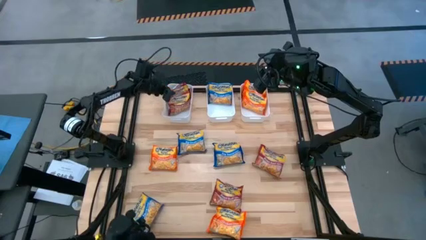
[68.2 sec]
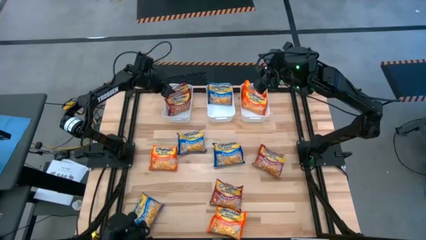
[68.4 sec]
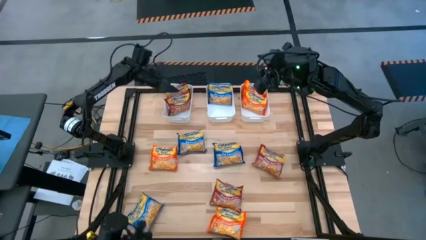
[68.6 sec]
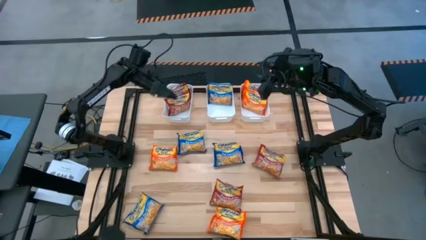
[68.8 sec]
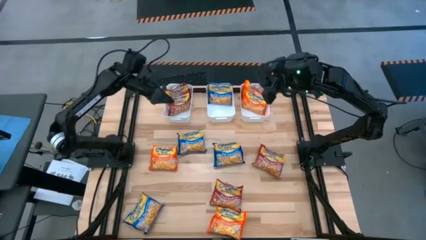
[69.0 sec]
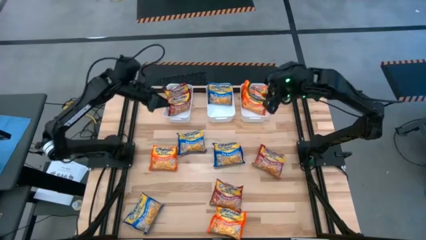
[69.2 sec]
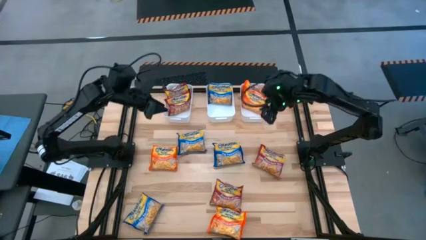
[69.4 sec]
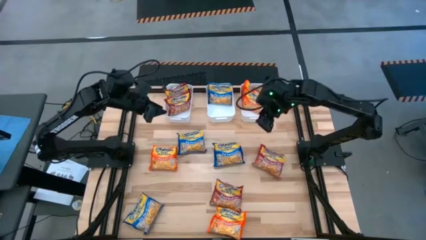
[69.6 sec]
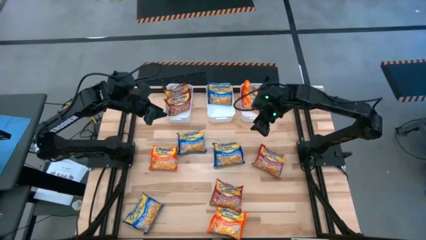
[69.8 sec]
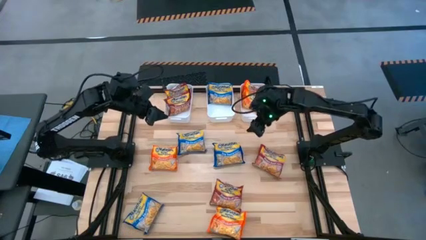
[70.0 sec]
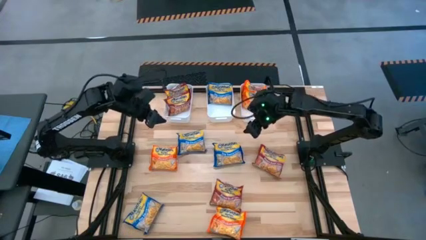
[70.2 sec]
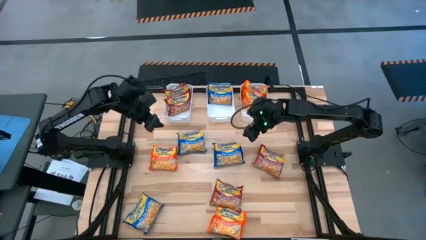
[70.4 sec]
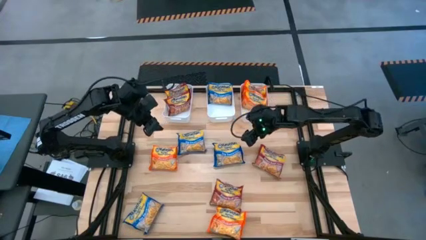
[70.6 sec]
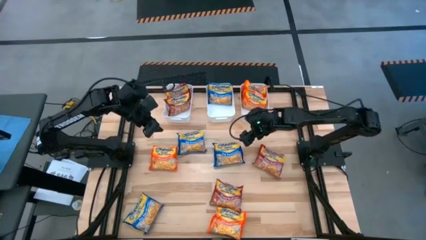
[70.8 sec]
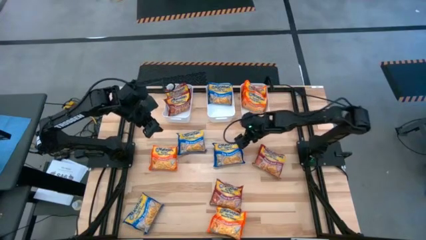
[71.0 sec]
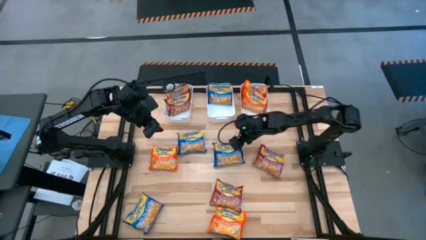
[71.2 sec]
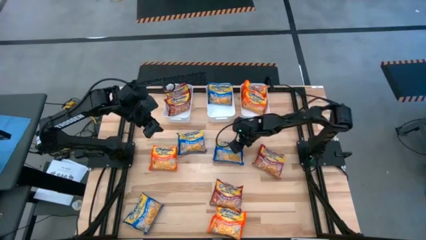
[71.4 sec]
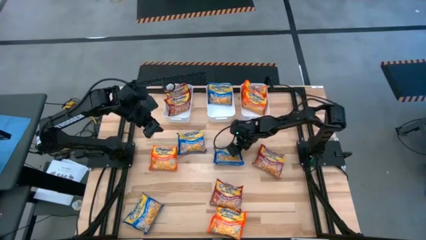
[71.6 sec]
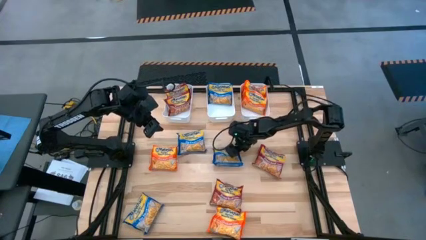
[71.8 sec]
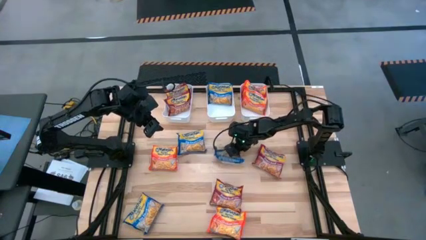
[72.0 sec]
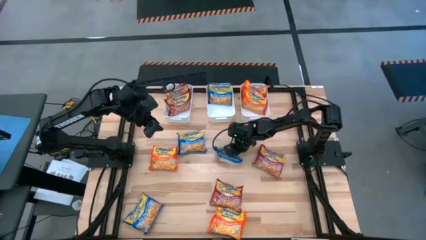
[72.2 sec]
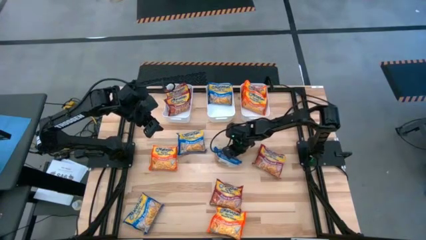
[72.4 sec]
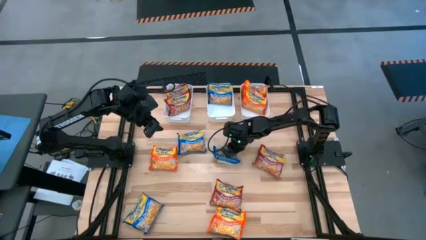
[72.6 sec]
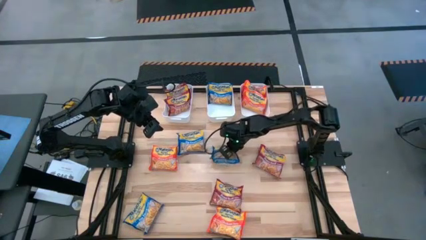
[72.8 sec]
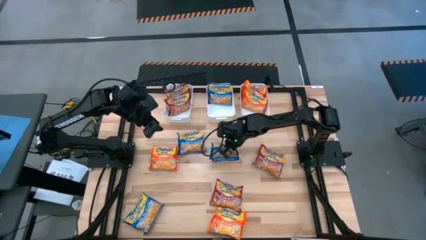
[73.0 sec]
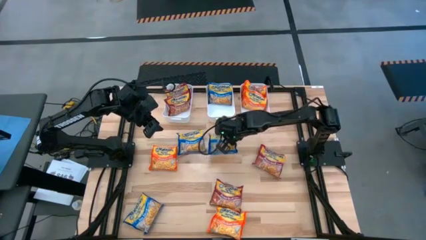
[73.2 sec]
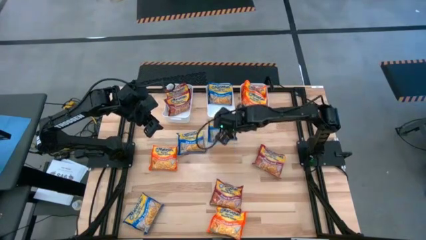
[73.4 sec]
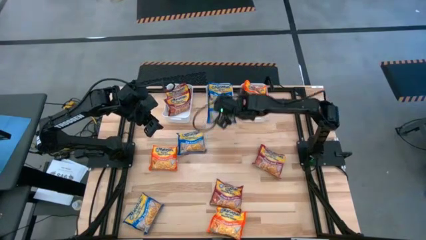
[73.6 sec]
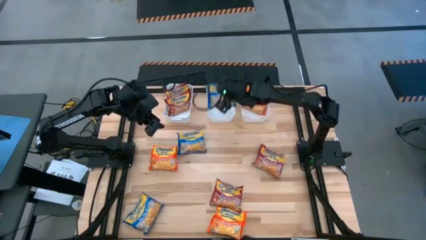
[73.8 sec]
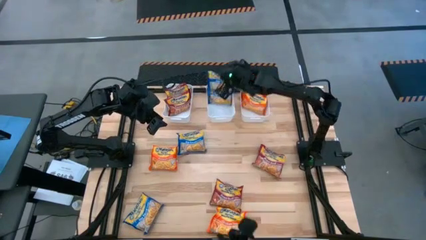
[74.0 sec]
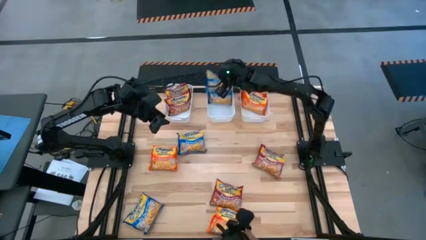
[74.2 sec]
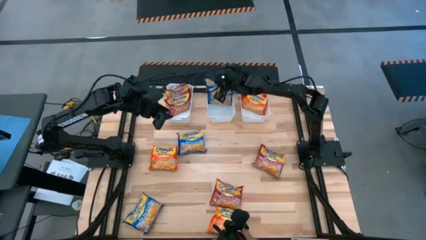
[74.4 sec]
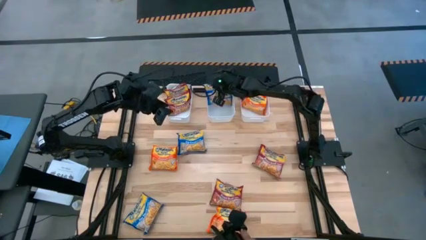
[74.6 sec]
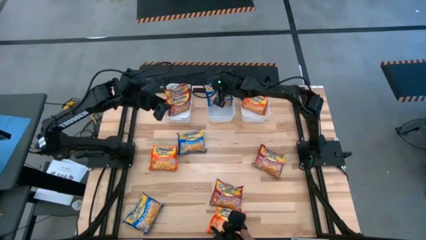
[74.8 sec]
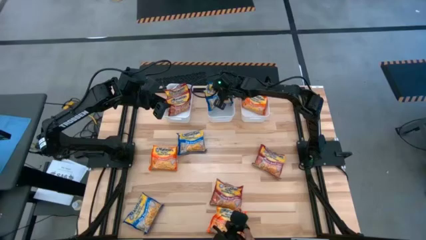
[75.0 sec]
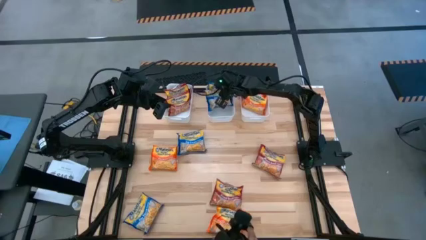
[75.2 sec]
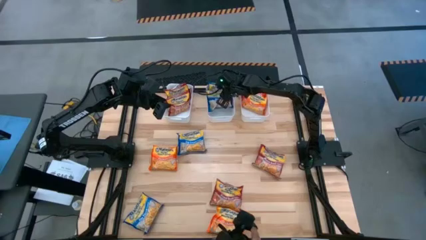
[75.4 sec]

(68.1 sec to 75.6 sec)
Task: Sort Maruchan noodles
Put the top blue noodle pack into the top middle white bin

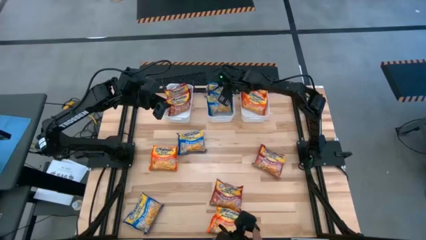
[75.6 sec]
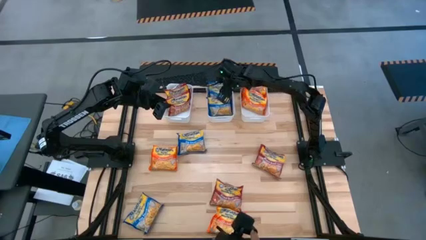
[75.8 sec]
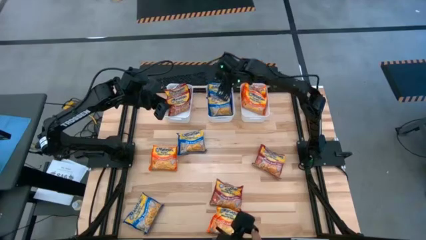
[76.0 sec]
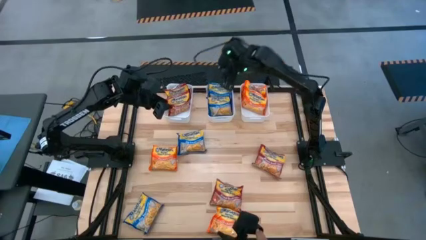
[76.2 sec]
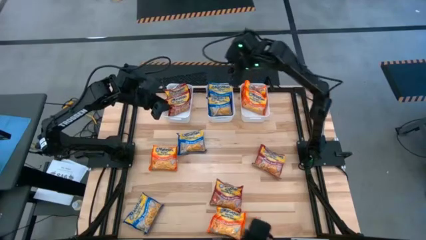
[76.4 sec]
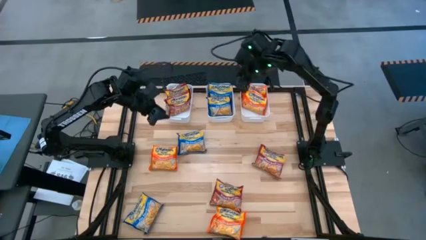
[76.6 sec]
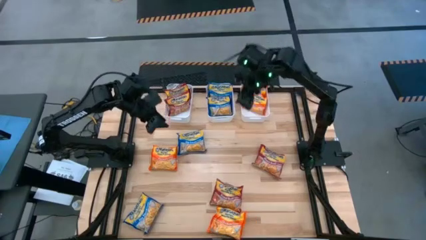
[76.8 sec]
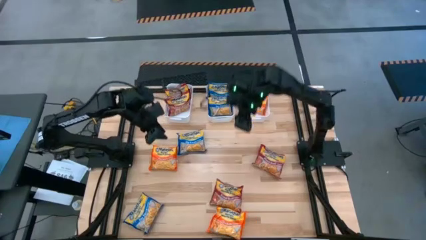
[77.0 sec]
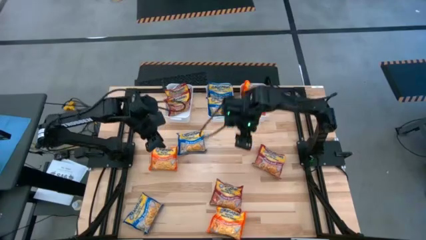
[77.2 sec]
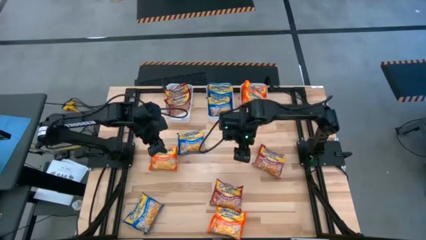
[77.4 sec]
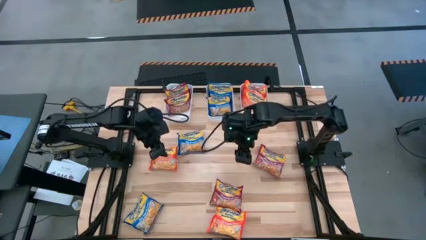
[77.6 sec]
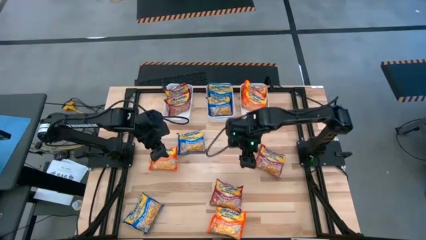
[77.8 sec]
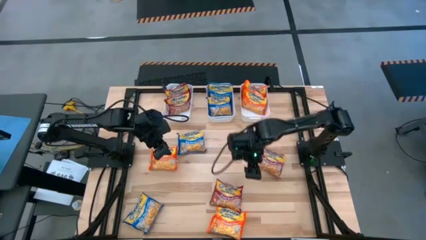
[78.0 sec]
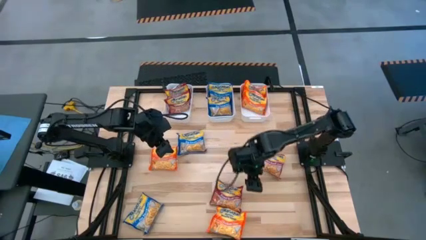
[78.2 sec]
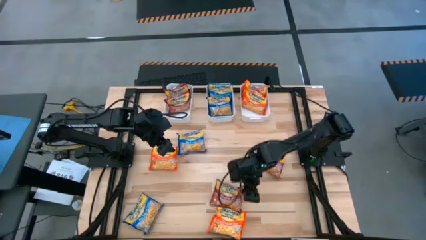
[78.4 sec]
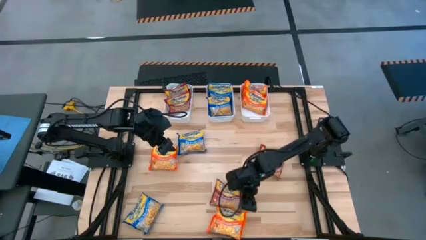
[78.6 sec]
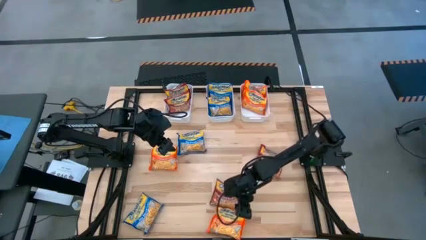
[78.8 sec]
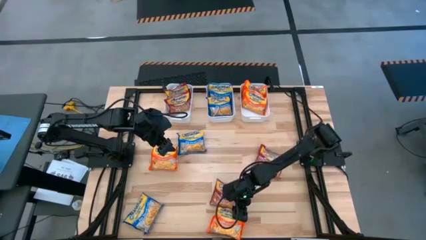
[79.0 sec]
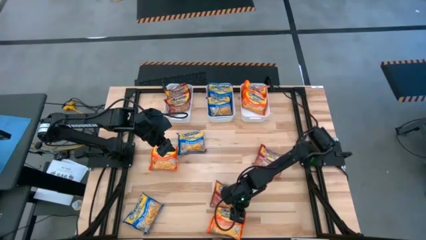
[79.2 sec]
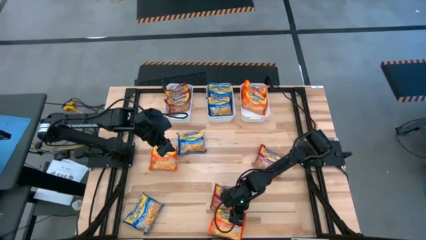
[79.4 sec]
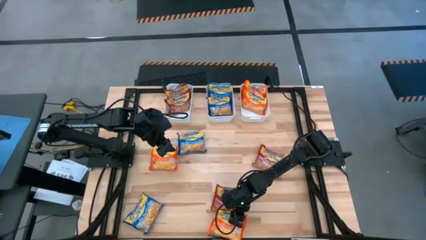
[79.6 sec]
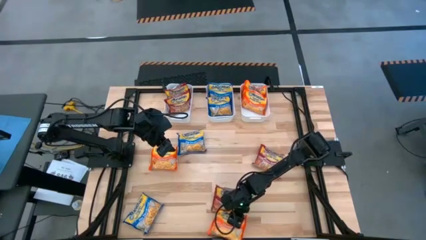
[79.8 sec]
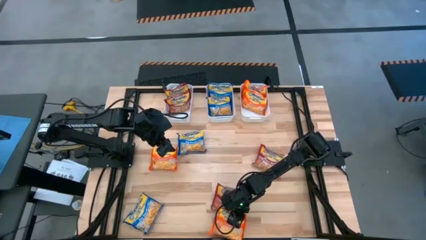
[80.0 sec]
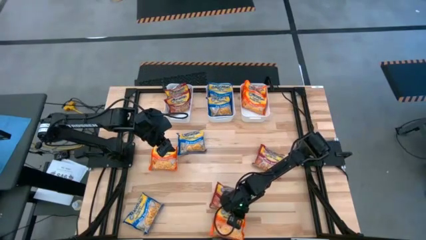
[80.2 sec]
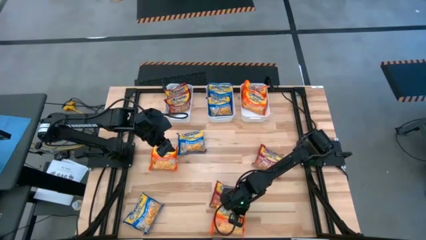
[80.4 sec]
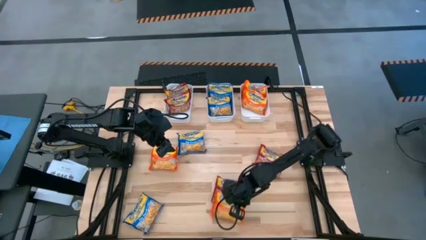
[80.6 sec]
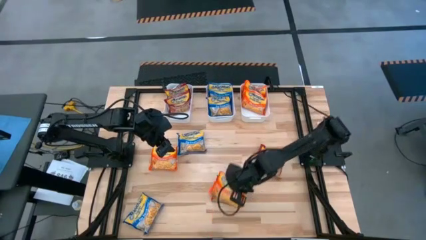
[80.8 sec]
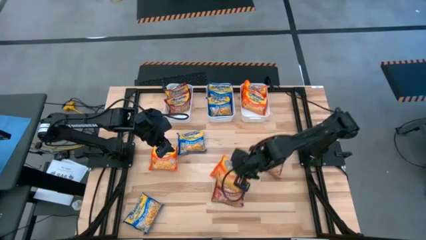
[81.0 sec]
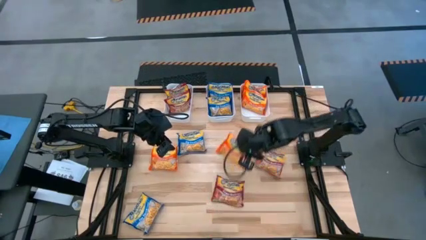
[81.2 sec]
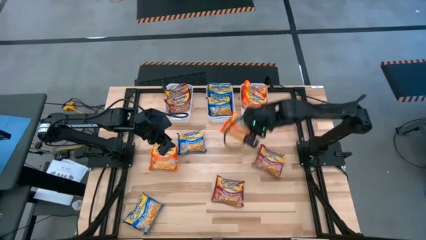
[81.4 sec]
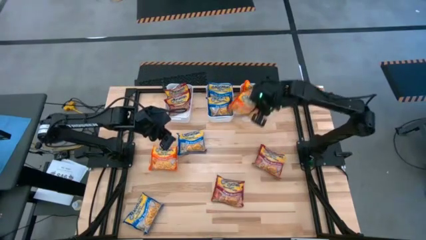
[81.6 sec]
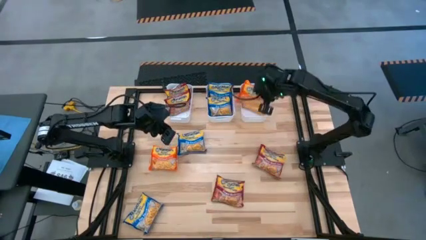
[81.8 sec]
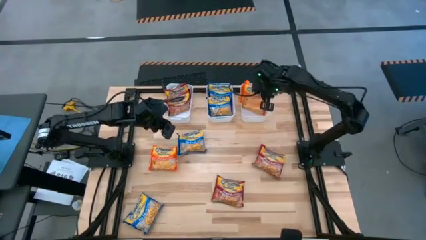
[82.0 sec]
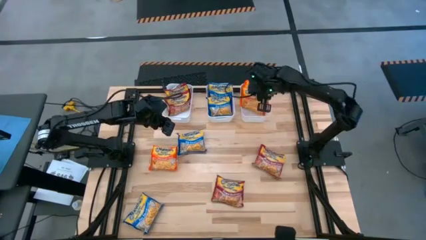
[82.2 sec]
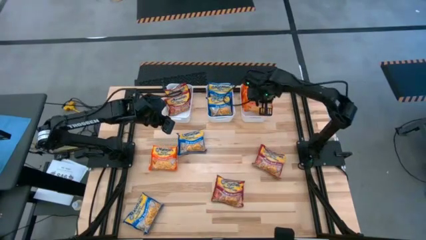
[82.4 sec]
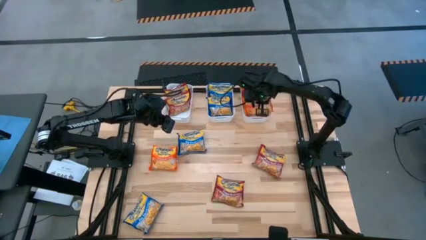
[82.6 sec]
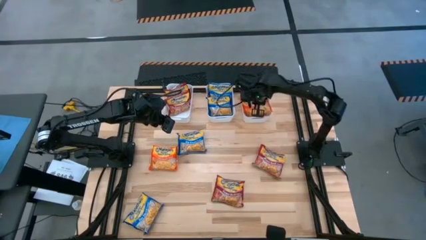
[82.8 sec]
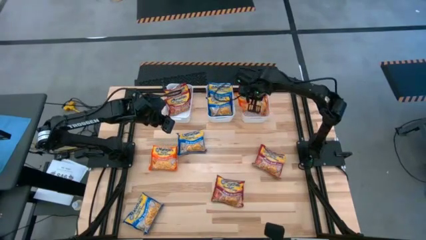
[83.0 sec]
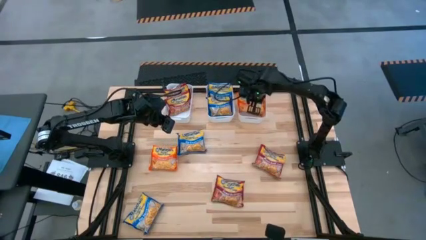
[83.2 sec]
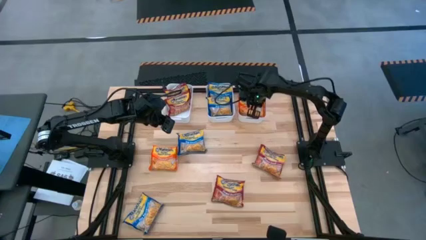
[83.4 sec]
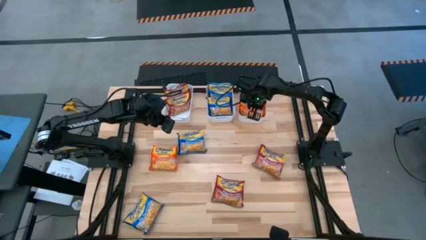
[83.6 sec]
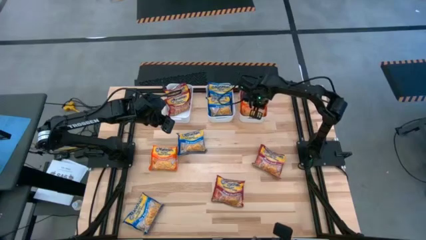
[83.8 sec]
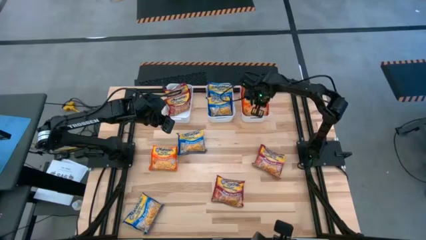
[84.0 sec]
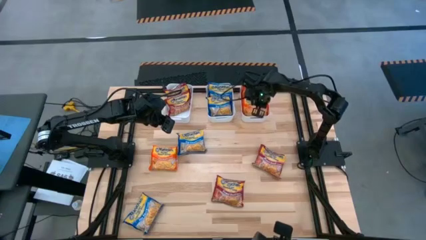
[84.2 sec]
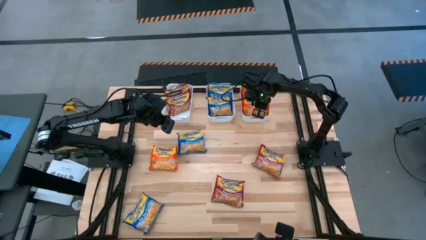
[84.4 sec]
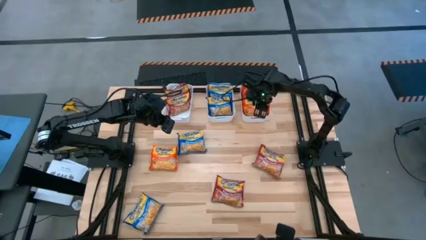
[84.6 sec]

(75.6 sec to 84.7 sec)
Put the bottom orange noodle pack into the top right white bin
